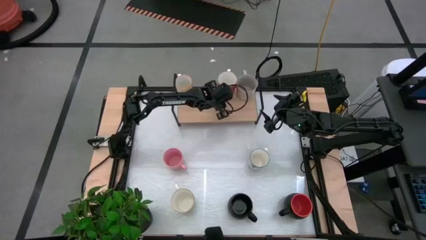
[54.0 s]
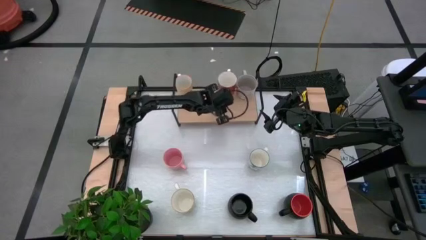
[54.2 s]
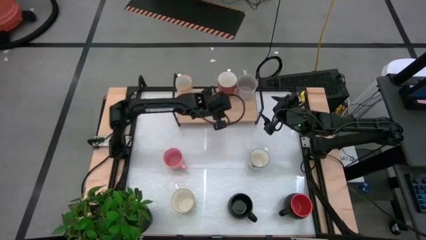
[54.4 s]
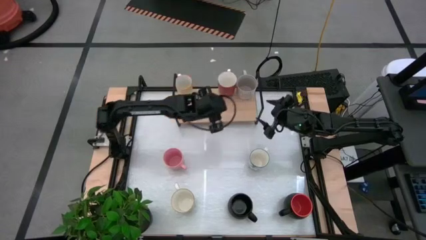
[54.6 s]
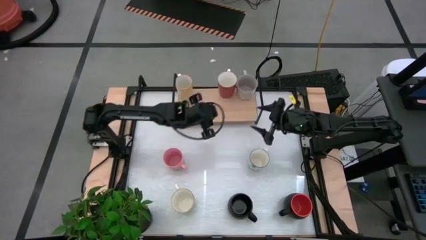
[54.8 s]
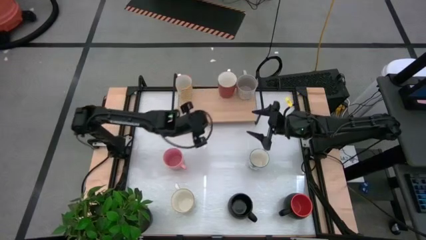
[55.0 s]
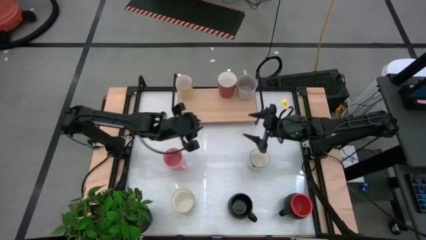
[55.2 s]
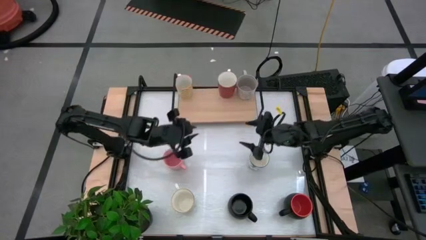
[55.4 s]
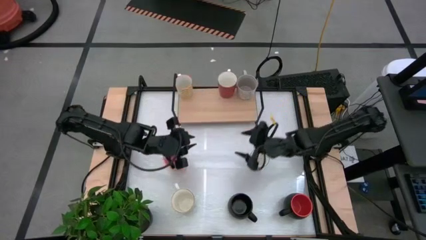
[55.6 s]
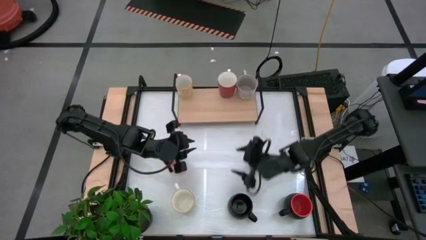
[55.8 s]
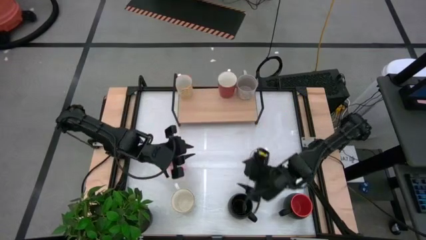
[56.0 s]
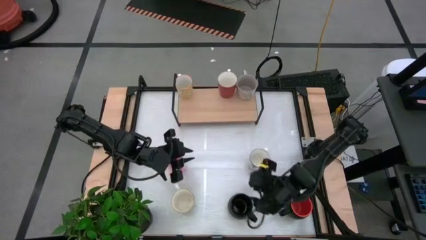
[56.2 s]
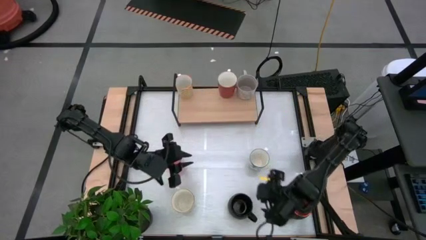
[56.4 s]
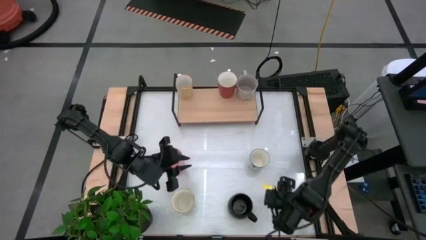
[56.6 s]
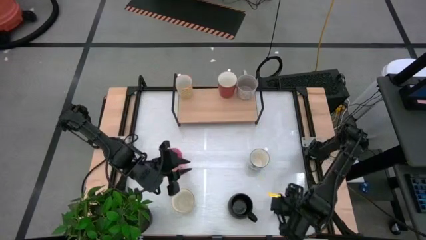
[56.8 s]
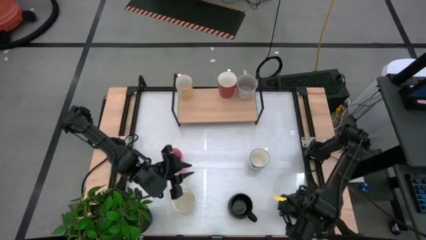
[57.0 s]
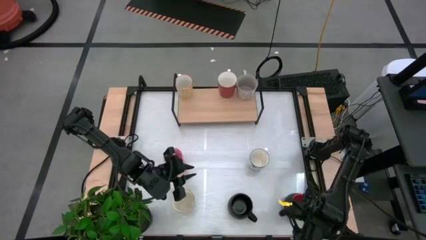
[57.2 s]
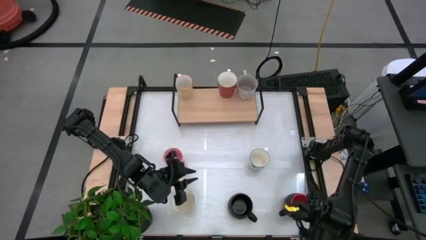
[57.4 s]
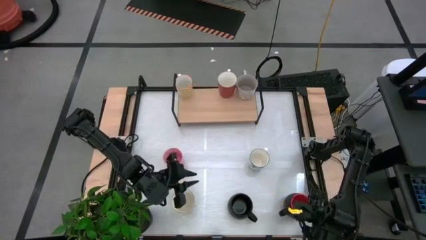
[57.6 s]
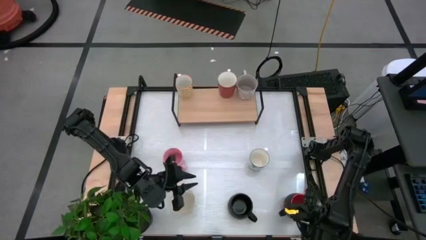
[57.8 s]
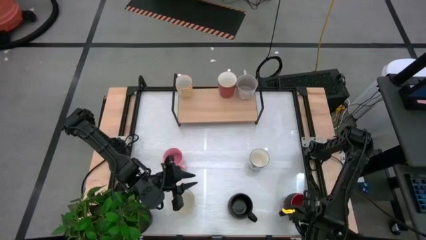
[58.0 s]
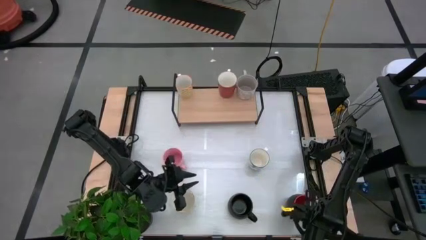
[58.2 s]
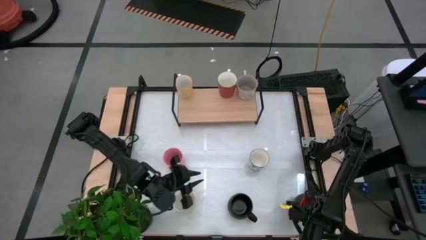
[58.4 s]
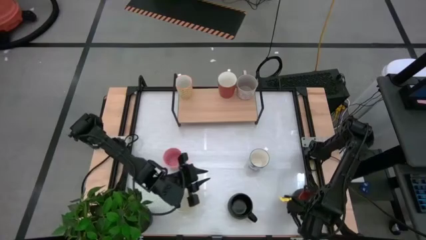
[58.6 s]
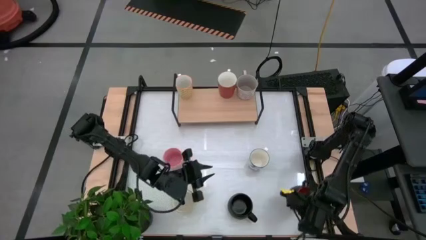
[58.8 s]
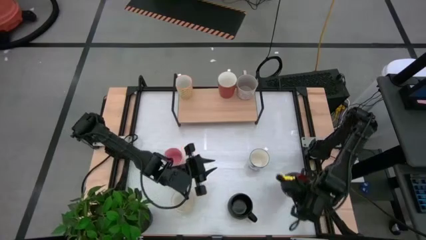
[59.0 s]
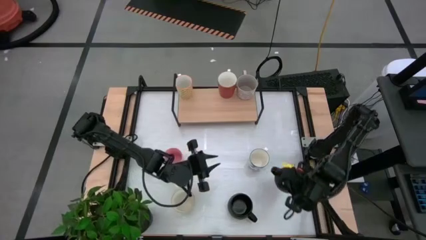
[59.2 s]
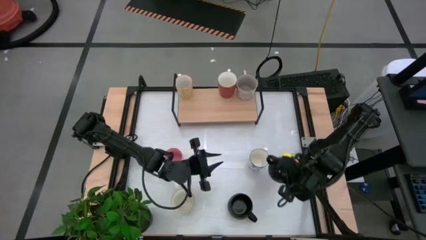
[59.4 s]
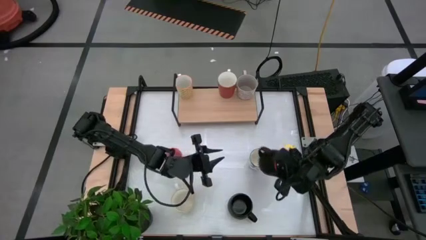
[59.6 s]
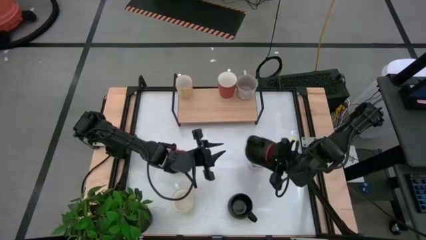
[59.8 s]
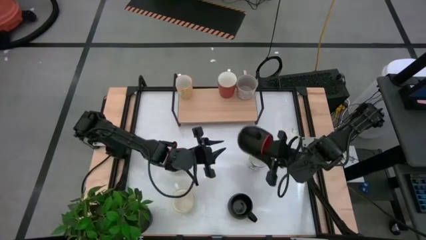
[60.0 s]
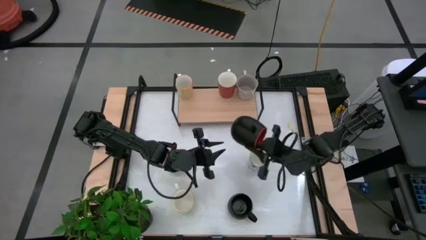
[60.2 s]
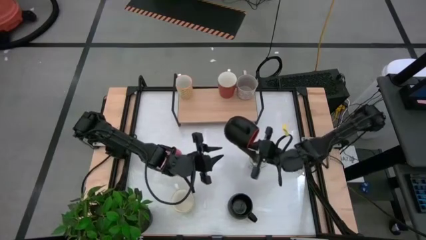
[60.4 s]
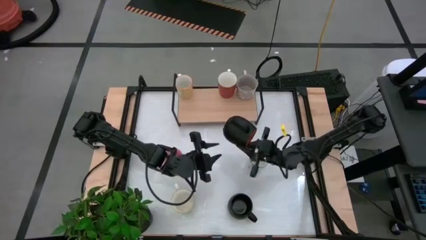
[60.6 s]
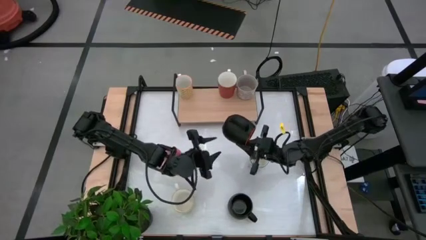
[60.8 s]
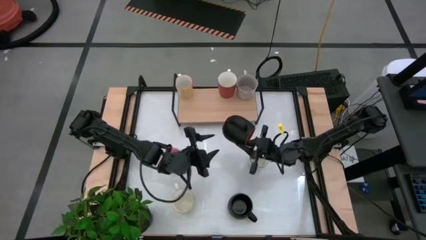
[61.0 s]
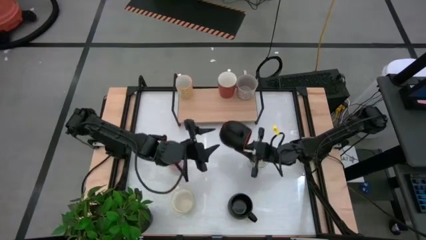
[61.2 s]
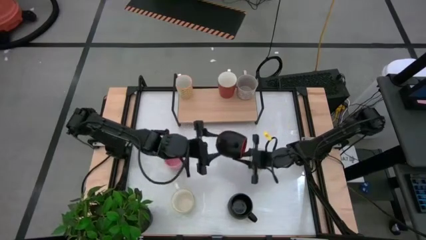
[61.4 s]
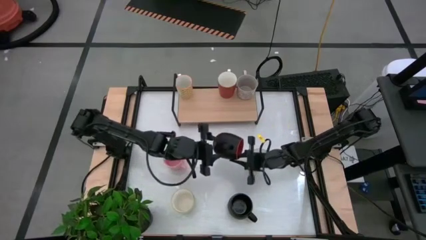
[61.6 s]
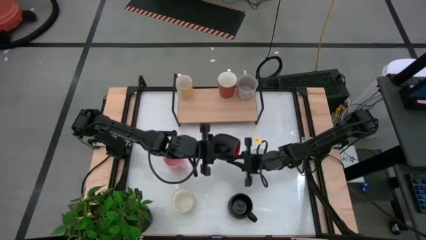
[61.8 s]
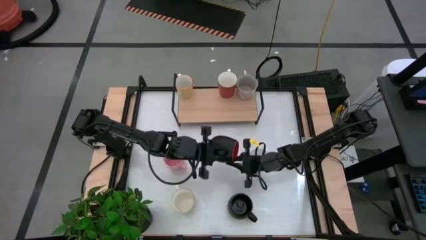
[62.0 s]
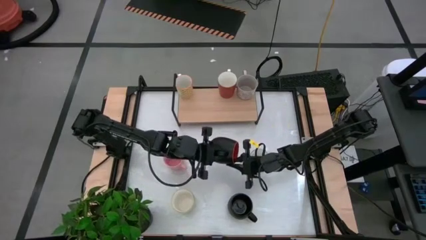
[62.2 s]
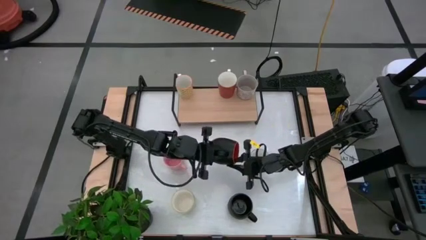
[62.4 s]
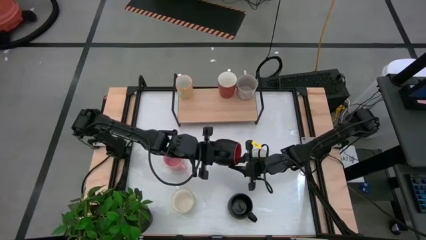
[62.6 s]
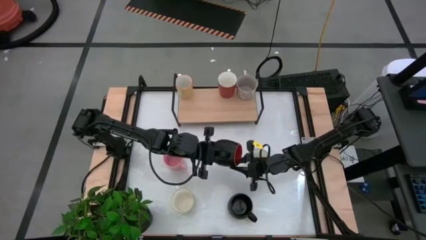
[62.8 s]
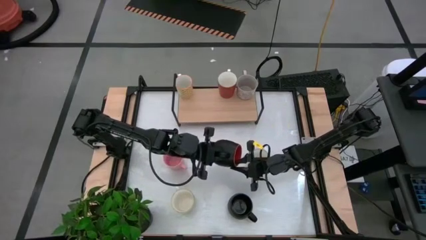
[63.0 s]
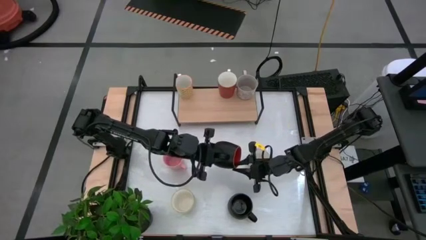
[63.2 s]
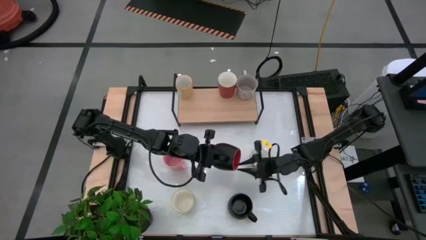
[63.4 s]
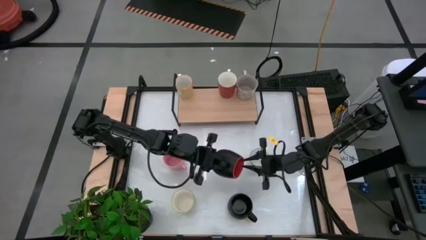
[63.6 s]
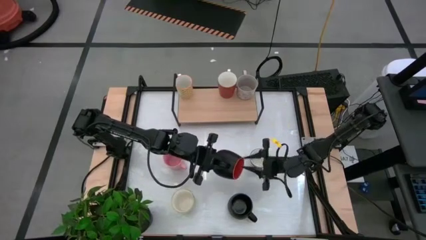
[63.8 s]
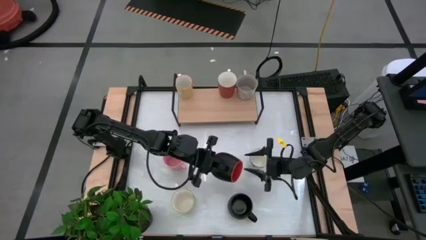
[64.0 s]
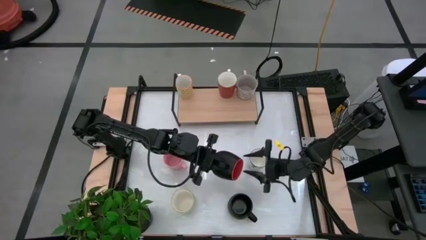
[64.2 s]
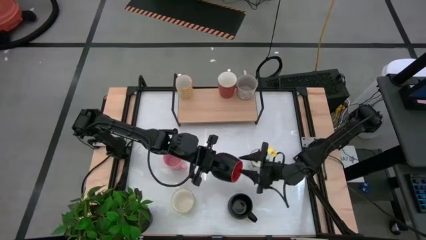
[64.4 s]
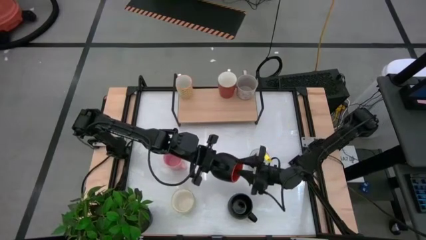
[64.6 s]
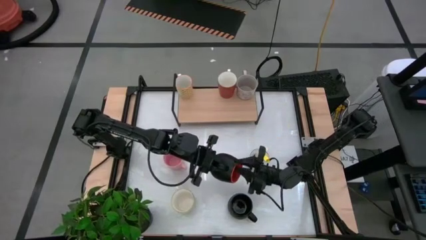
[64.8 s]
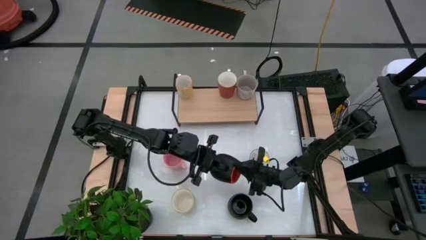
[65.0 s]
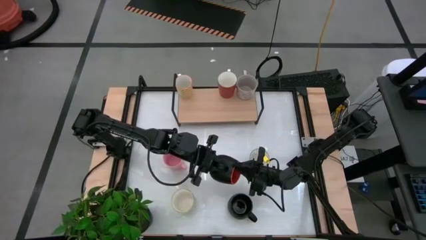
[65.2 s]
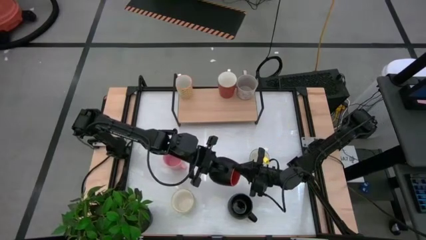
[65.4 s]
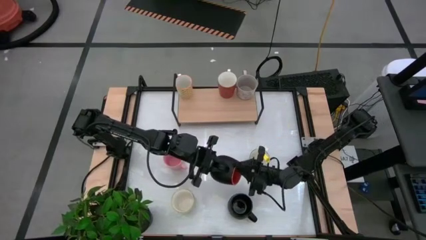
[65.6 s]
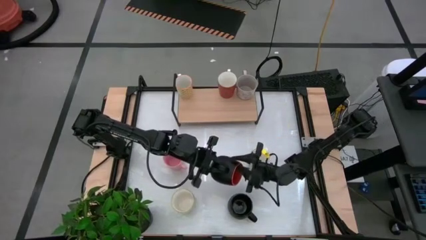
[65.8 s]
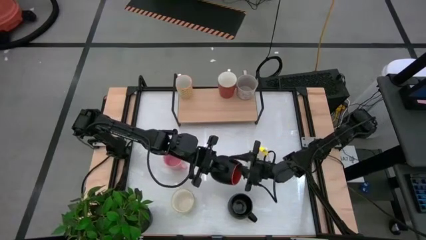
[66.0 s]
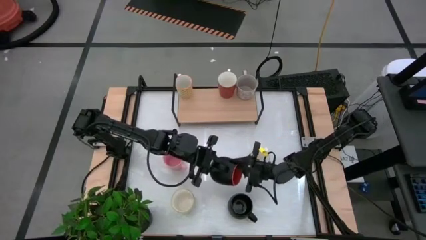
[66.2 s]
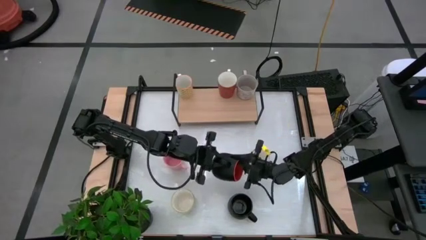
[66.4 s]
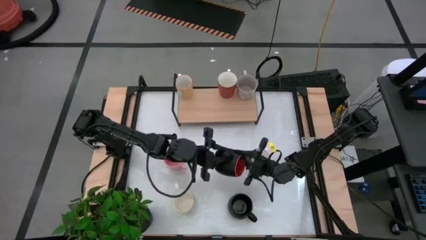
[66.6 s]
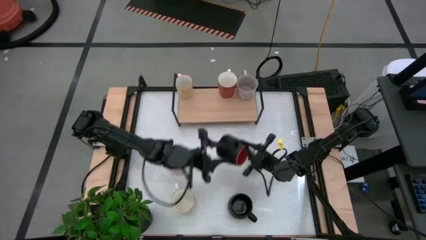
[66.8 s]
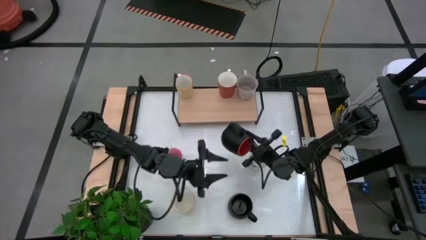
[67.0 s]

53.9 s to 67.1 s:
Task: Place coffee mugs
Put the orange mug on the shelf

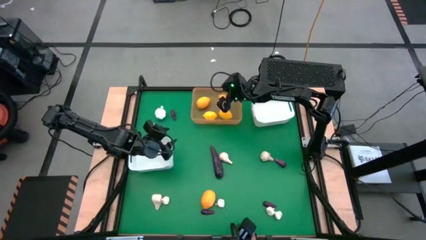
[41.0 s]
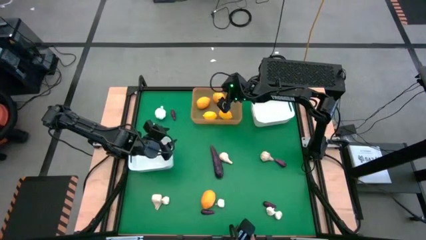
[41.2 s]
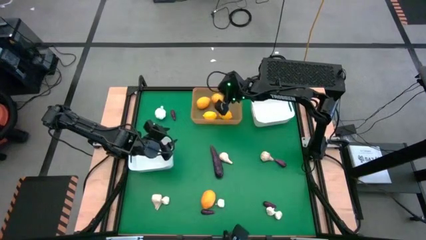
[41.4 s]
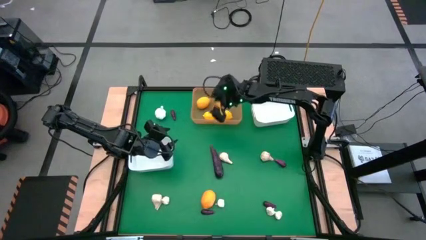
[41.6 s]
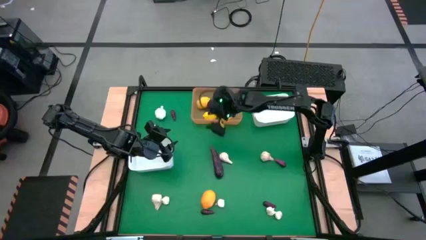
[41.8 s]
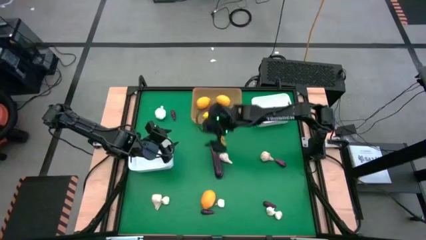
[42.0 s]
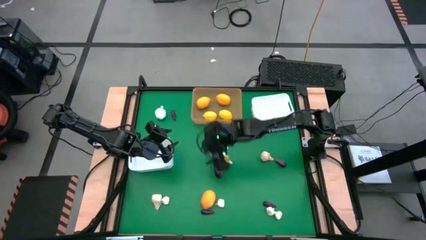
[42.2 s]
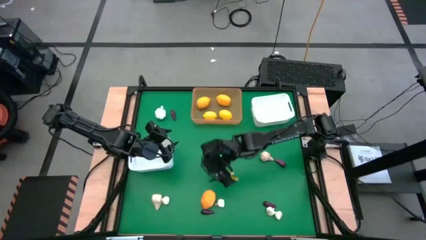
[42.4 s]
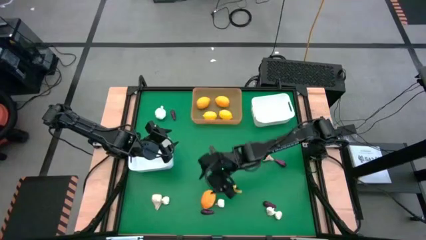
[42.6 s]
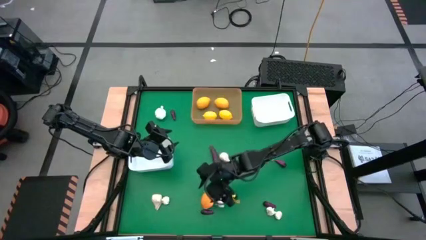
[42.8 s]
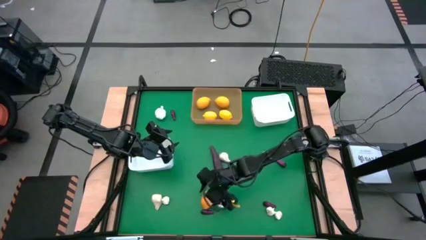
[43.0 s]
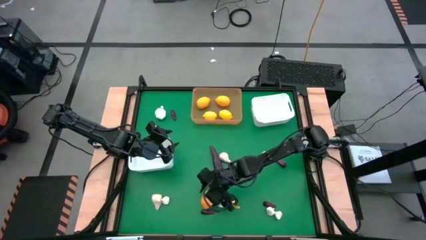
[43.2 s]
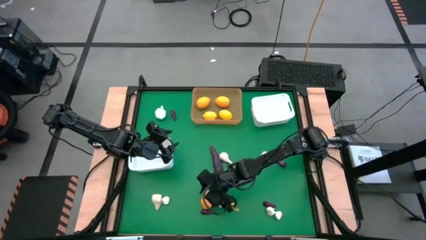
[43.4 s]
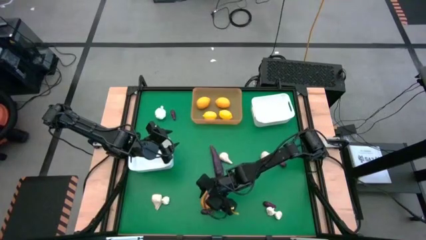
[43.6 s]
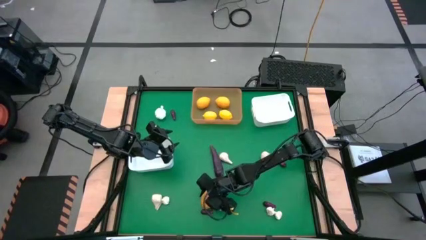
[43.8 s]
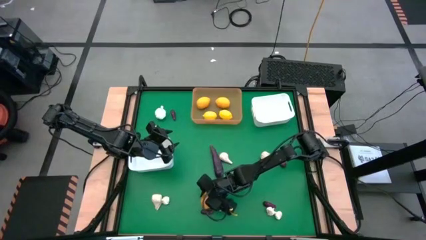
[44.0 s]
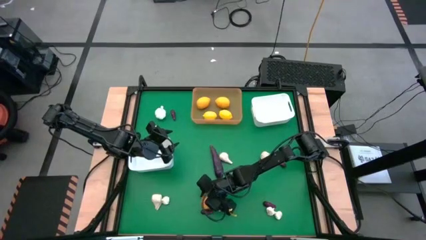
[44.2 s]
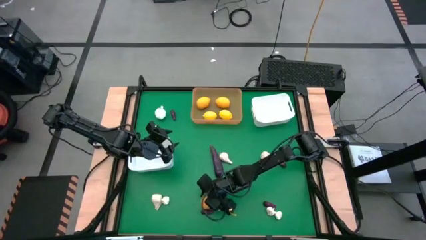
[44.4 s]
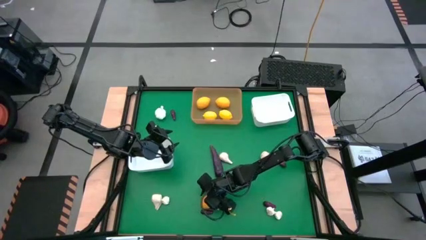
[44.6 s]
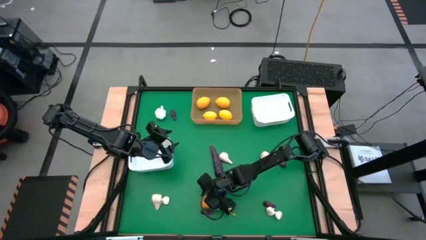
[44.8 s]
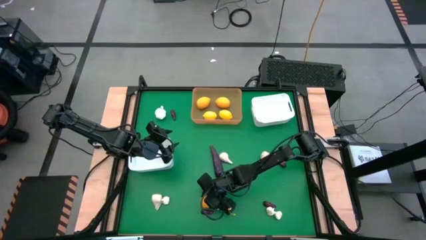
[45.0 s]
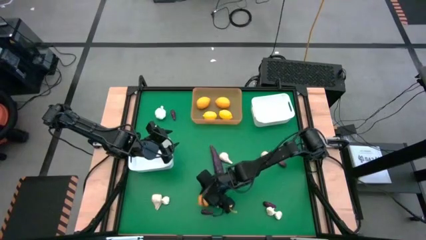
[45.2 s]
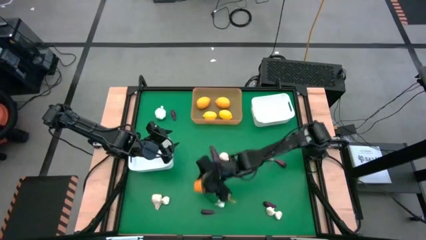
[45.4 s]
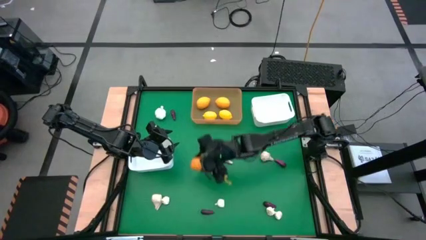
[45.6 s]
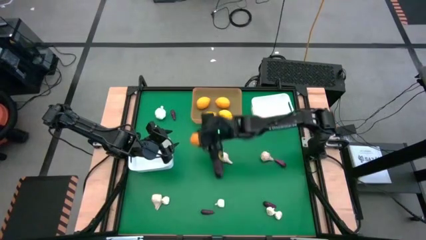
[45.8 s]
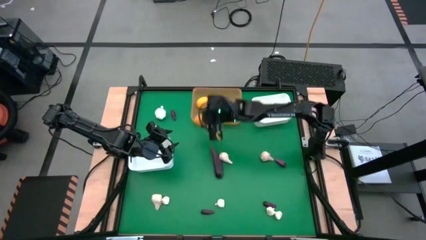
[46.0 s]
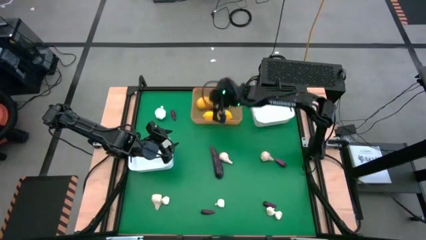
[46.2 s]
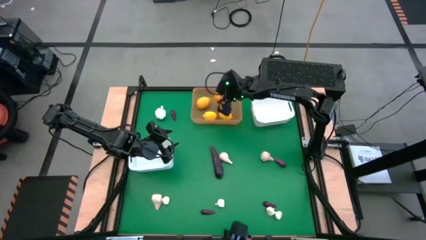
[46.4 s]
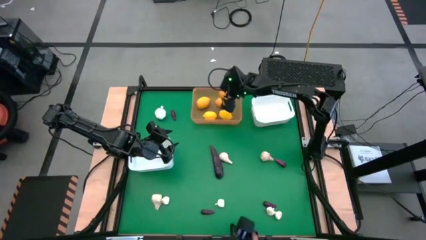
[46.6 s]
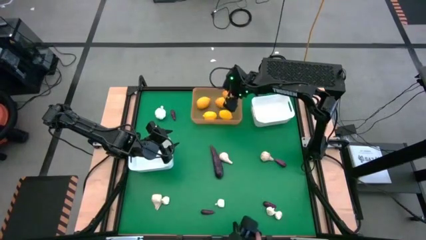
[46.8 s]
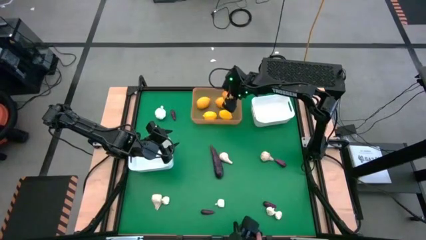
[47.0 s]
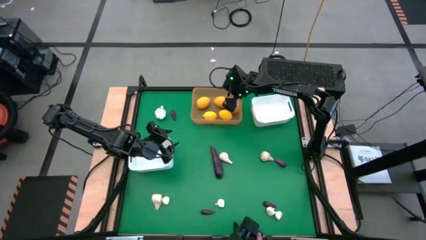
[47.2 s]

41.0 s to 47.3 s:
Task: Sort produce into baskets
Put the lemon into the yellow bin
